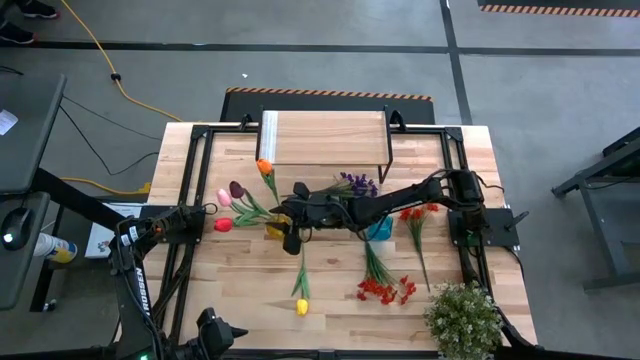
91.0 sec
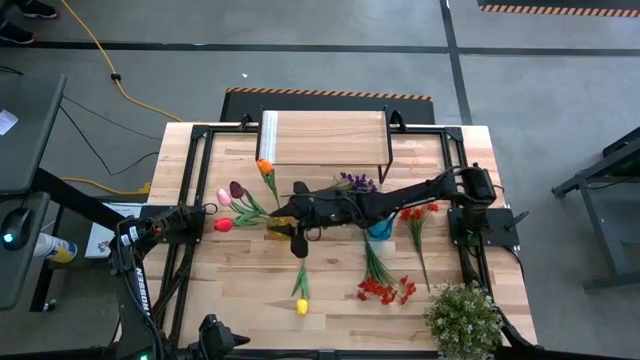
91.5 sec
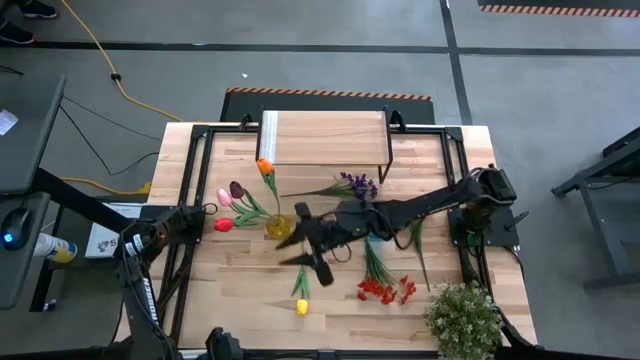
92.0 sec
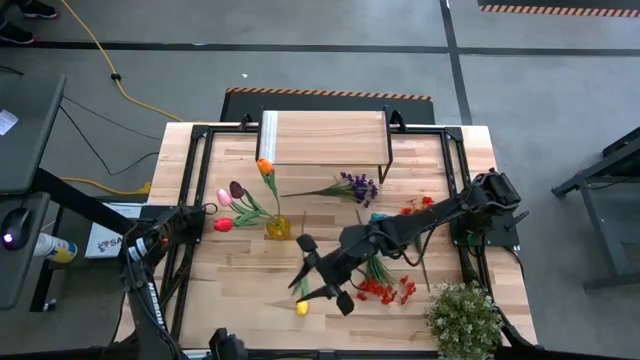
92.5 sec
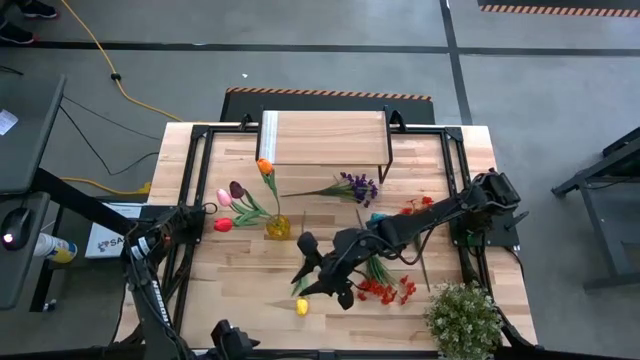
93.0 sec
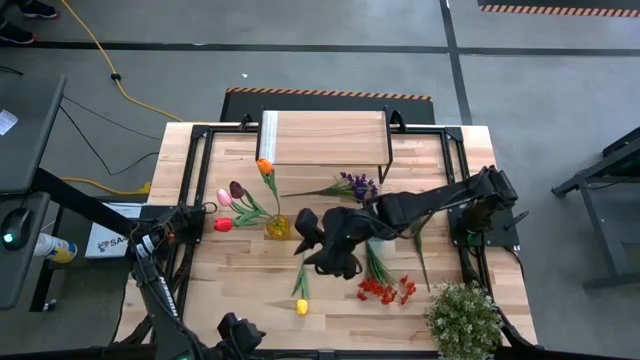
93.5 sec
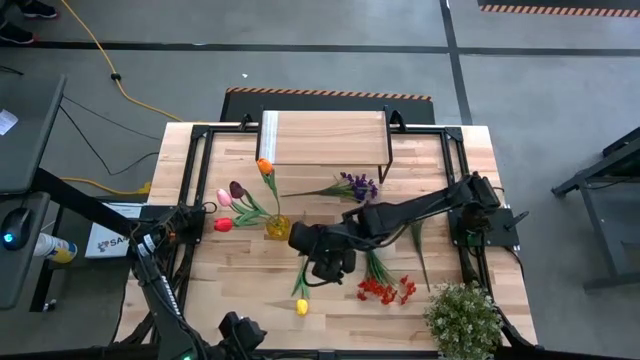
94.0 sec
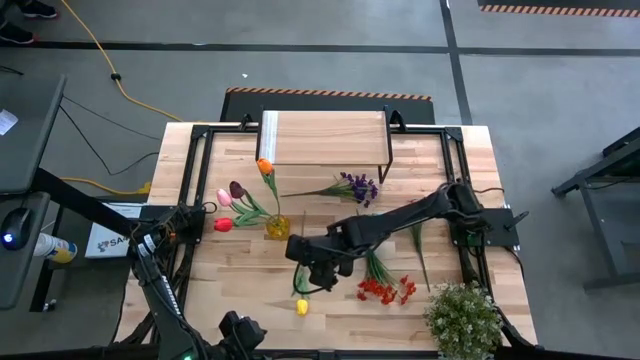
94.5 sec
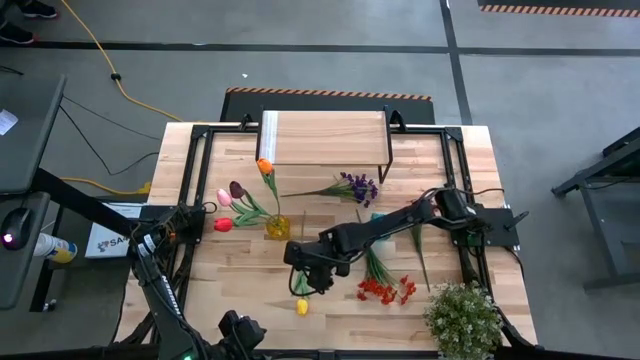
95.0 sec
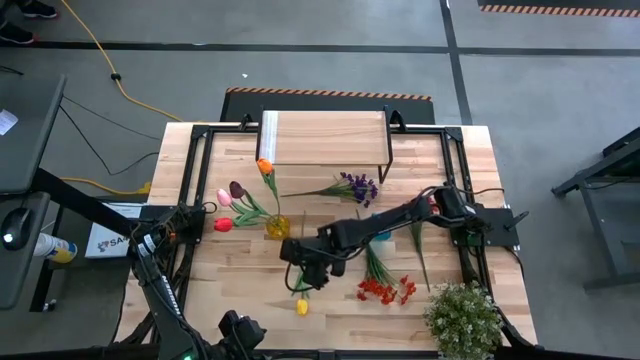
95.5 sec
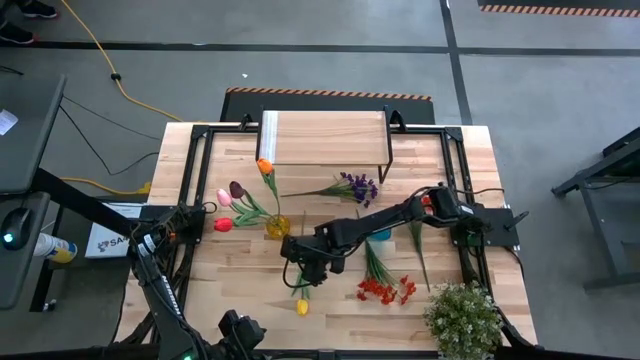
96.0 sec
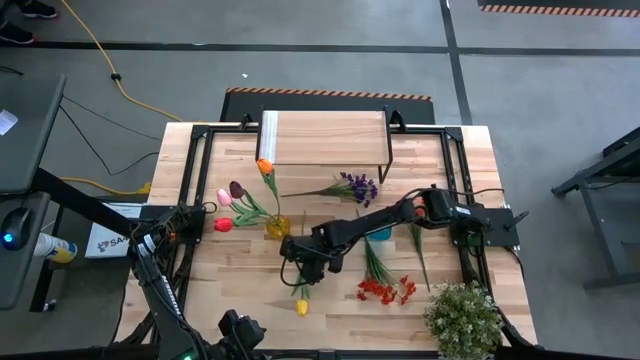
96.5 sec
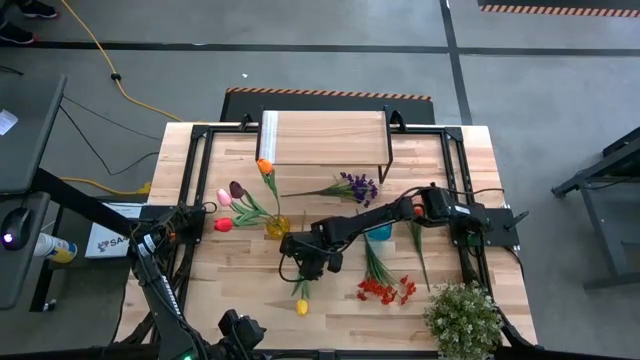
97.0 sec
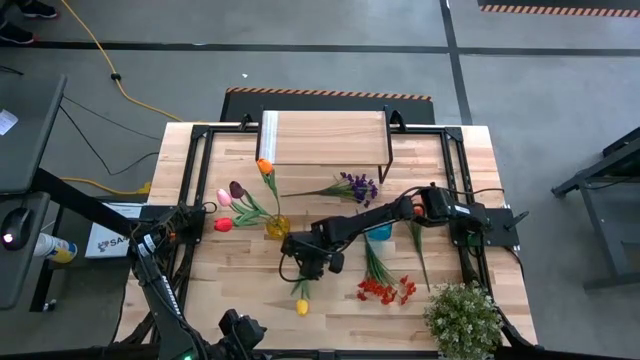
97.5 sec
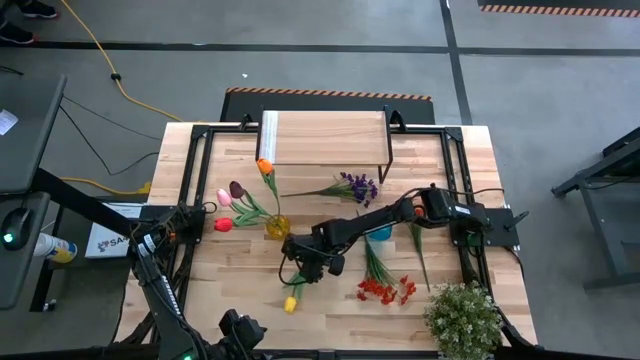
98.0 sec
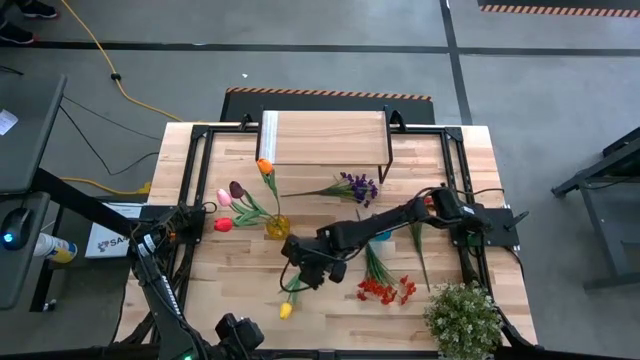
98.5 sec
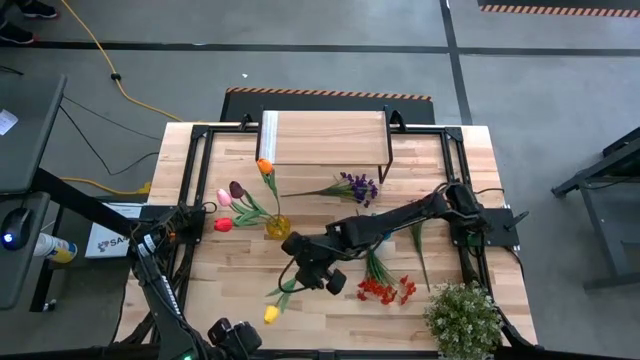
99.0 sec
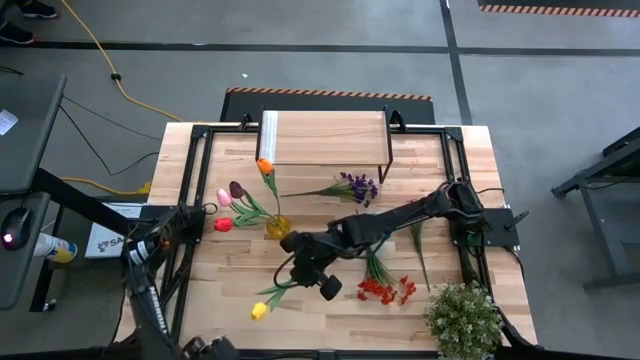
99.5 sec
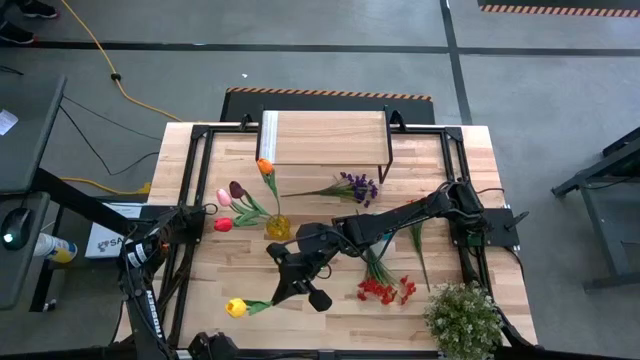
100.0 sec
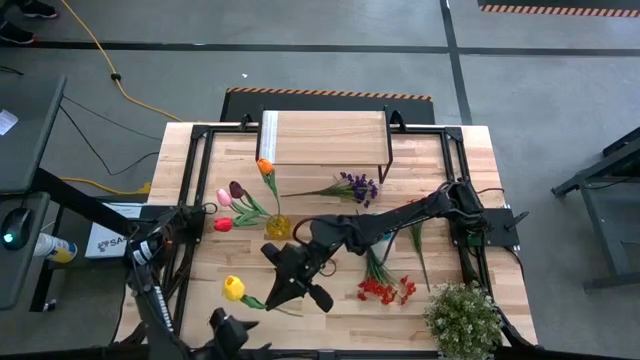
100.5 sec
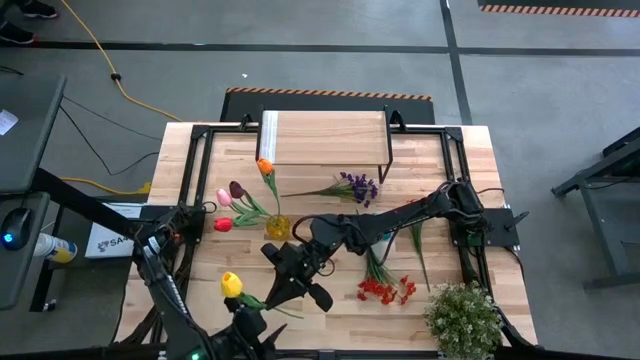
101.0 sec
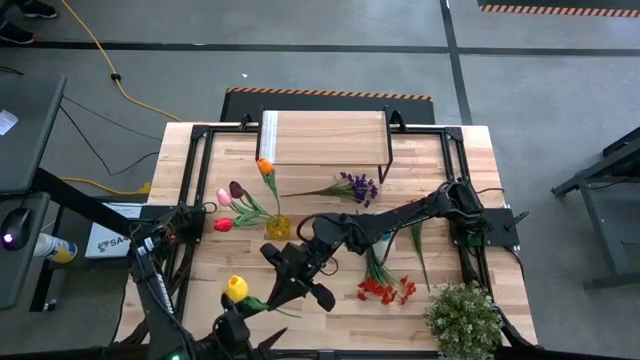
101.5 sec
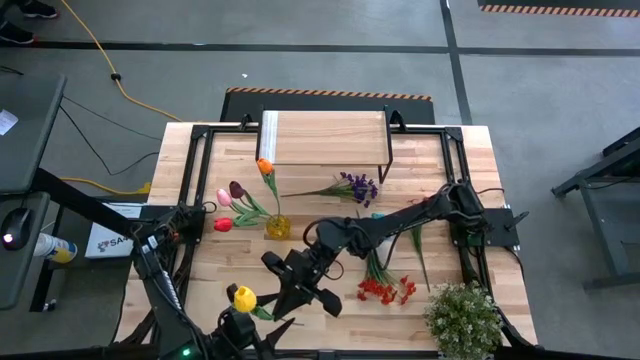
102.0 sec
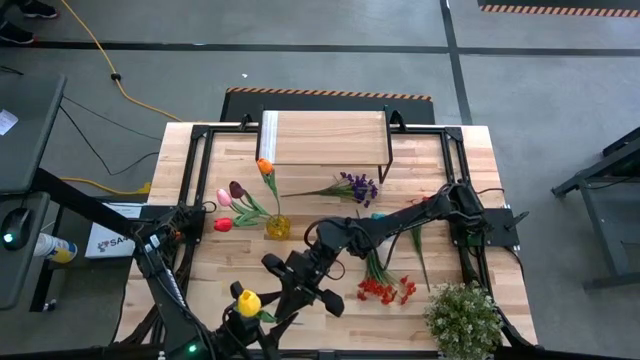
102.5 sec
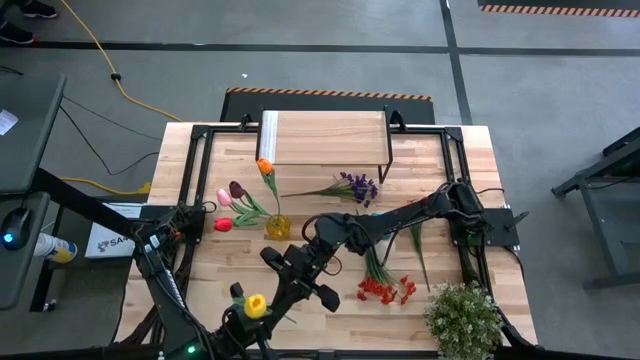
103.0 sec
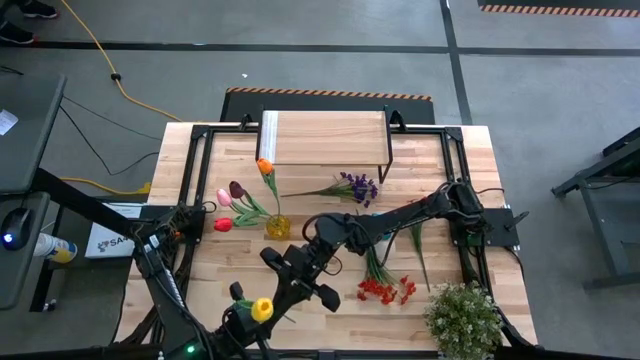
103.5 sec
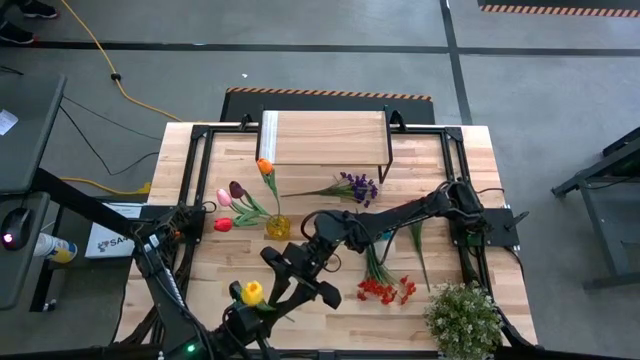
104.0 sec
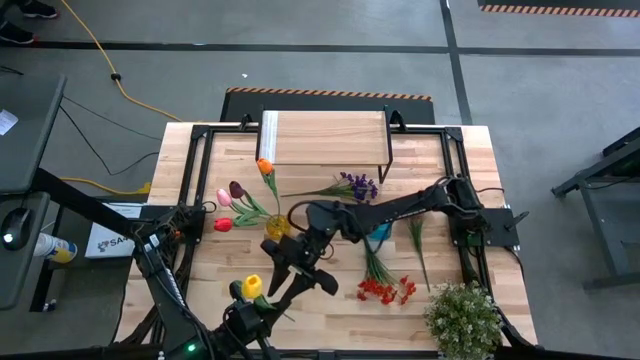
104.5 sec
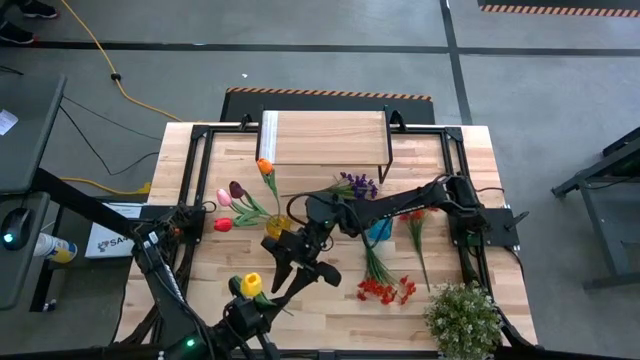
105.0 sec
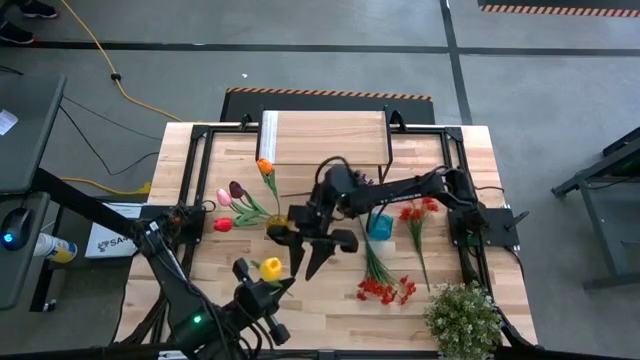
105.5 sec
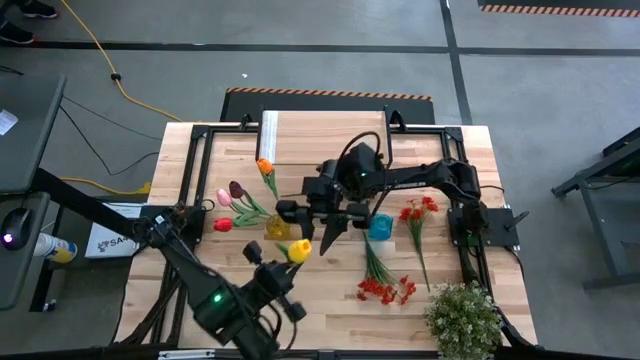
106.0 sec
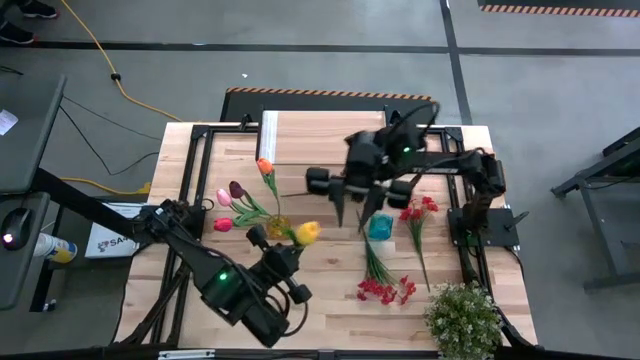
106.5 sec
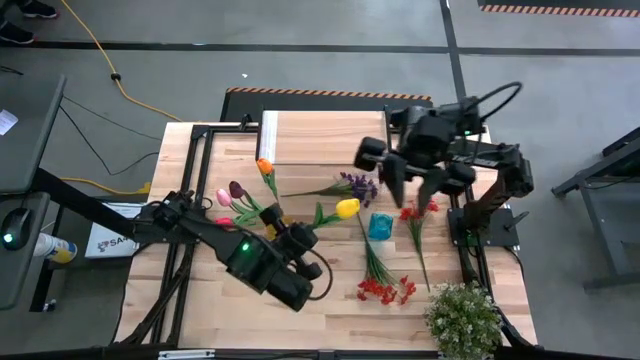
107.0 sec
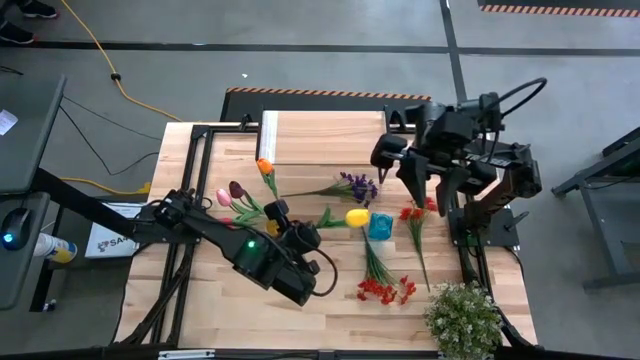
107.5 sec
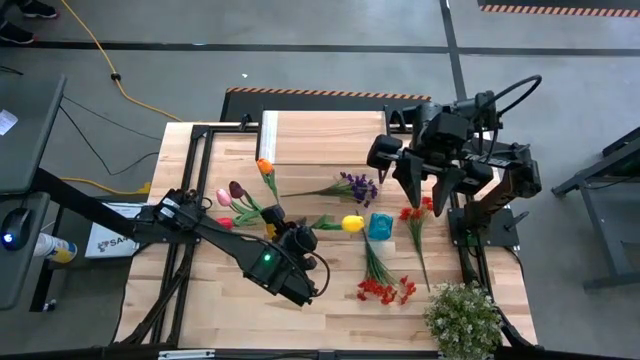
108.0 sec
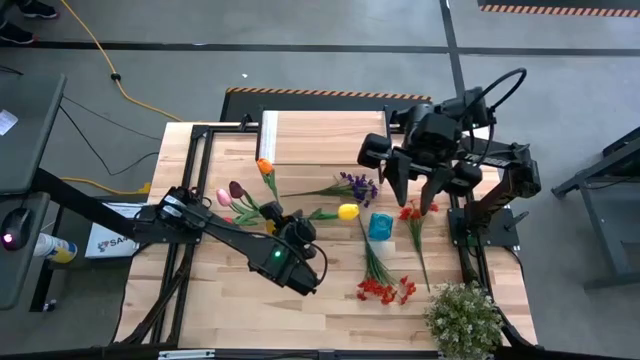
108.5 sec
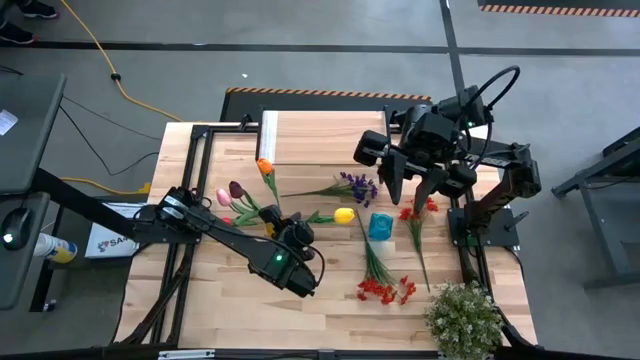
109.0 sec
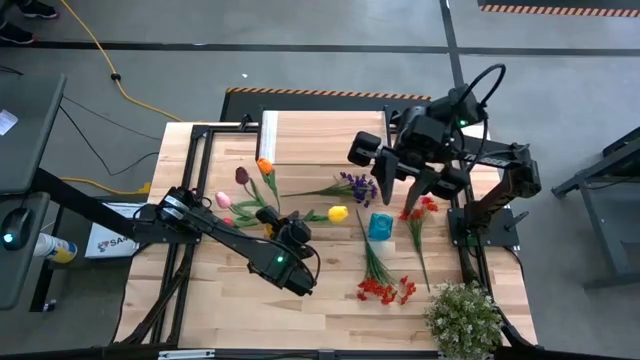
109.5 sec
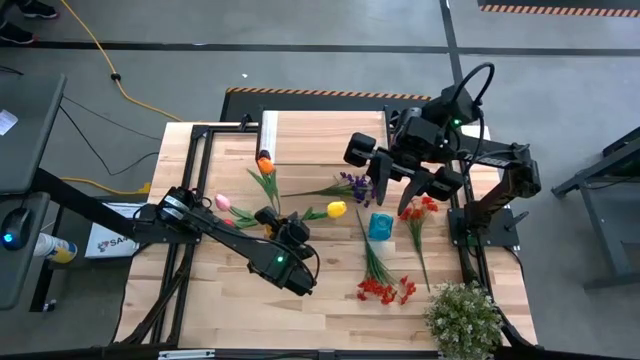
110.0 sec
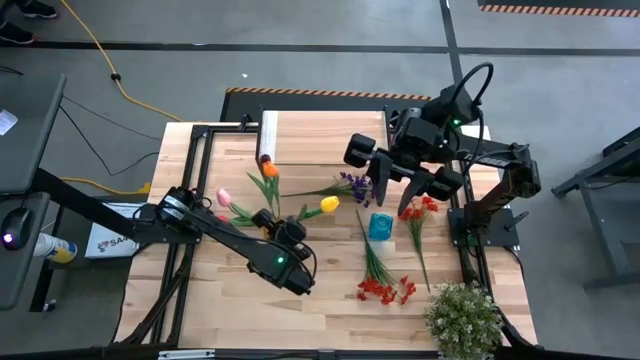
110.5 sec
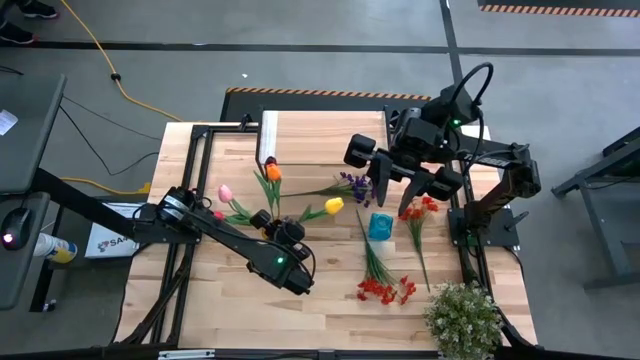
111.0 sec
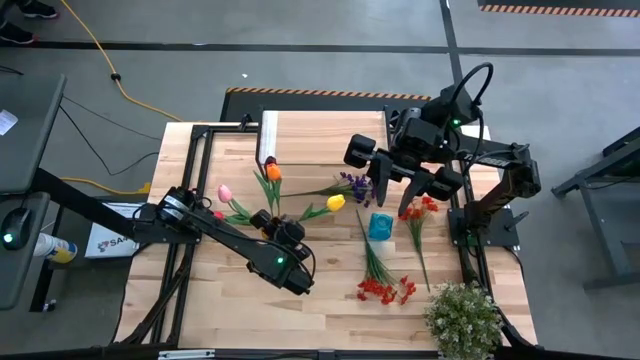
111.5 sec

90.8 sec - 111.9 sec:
Task: Pick and place flowers into a vace then onto a shelf
Put the yellow tulip into the yellow vase
